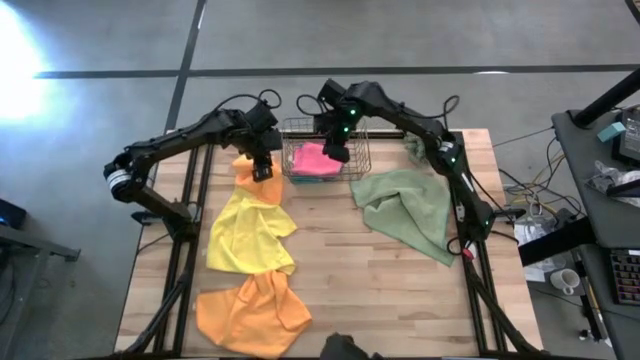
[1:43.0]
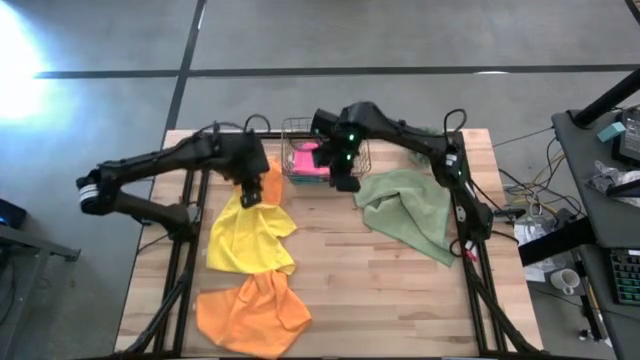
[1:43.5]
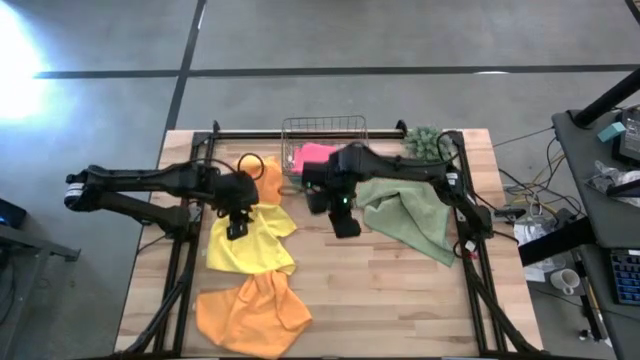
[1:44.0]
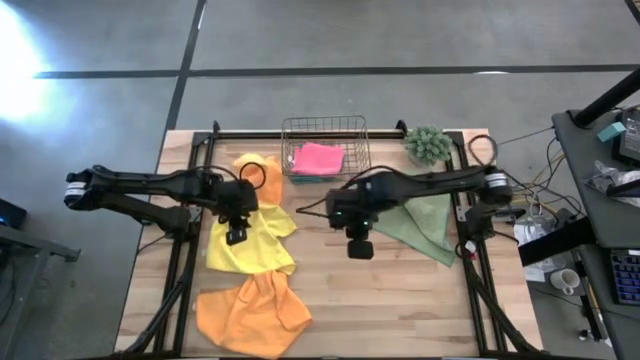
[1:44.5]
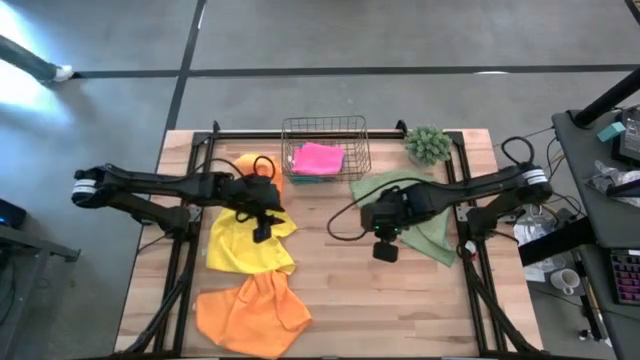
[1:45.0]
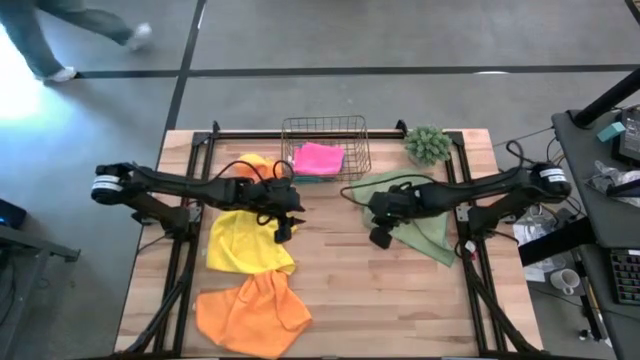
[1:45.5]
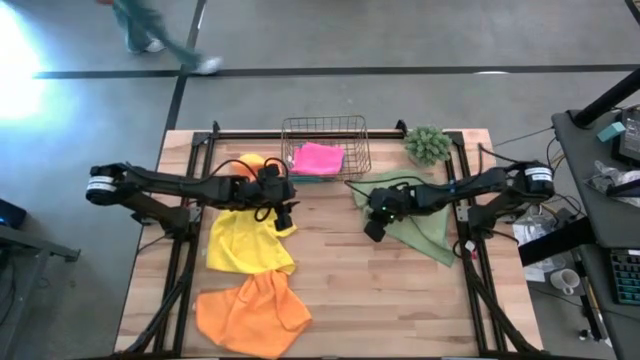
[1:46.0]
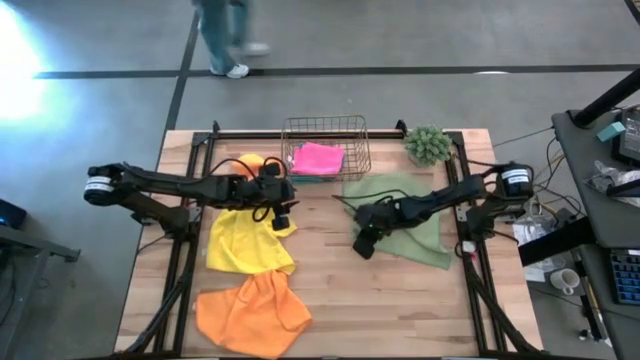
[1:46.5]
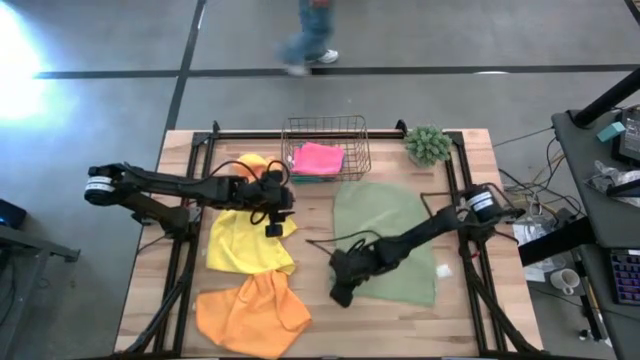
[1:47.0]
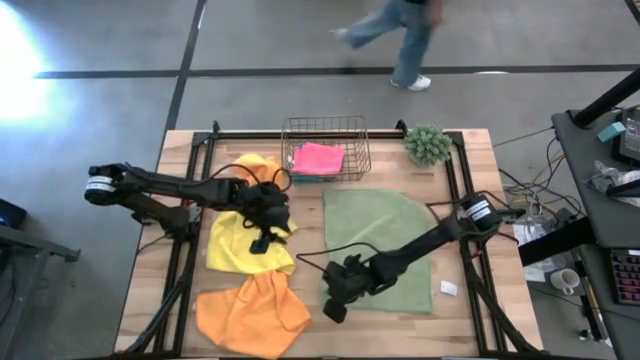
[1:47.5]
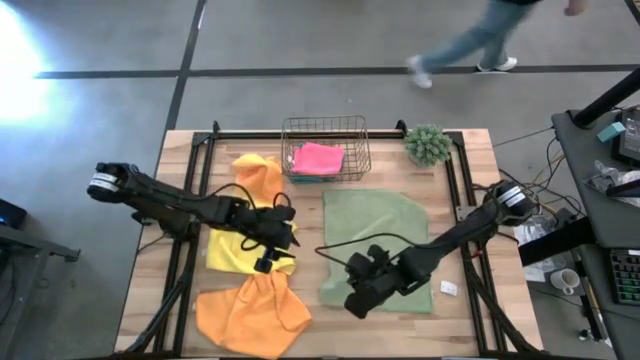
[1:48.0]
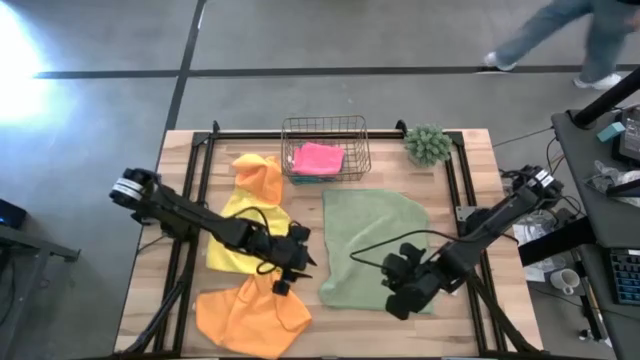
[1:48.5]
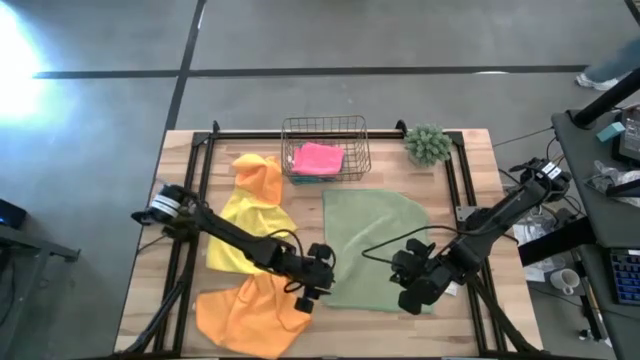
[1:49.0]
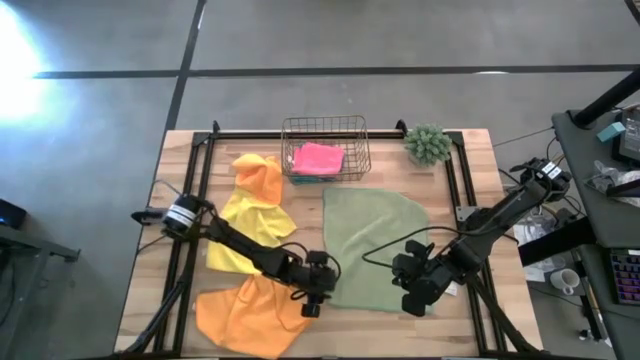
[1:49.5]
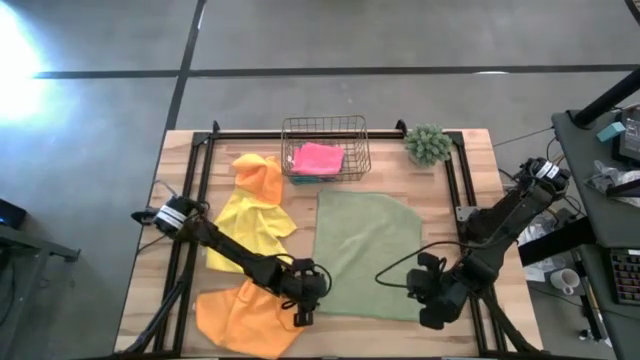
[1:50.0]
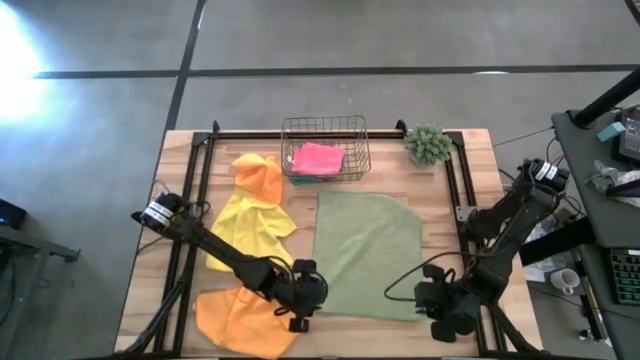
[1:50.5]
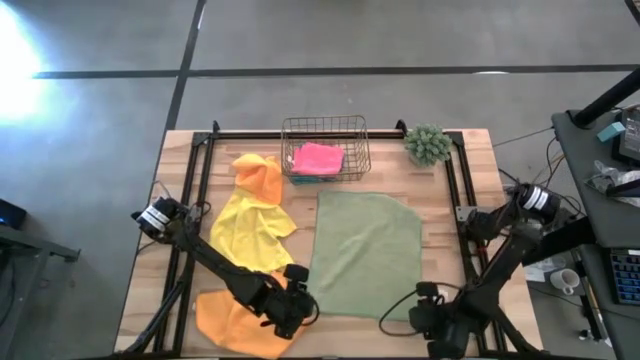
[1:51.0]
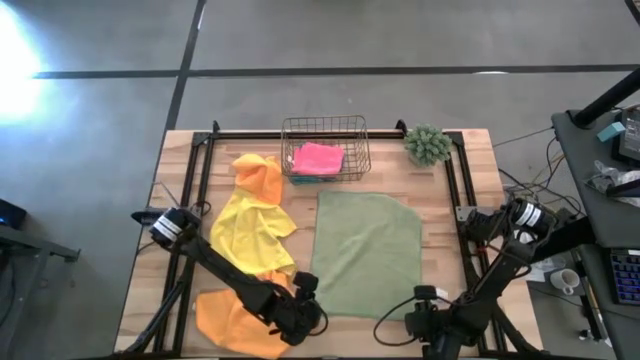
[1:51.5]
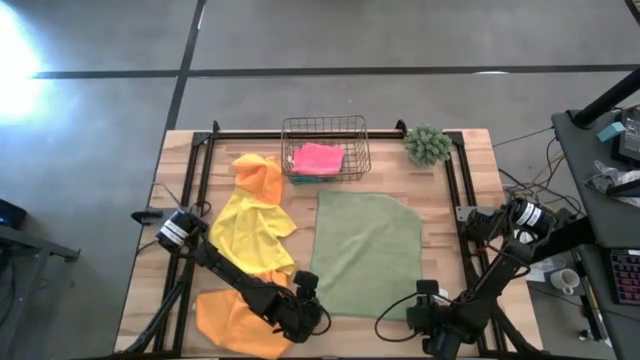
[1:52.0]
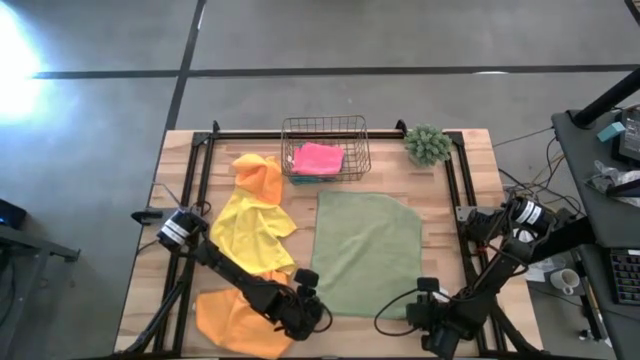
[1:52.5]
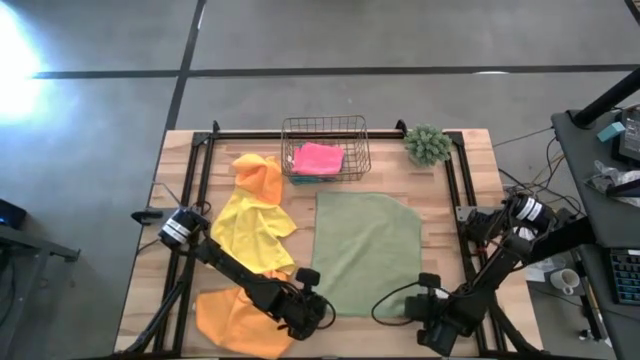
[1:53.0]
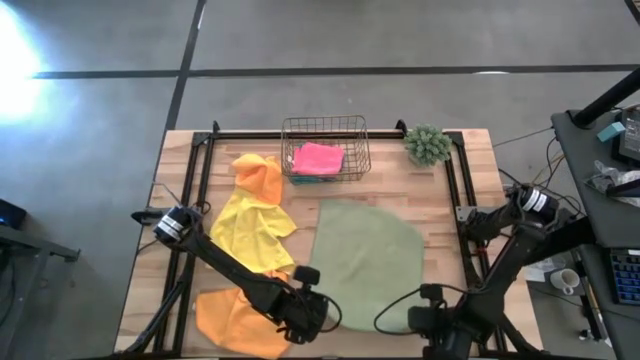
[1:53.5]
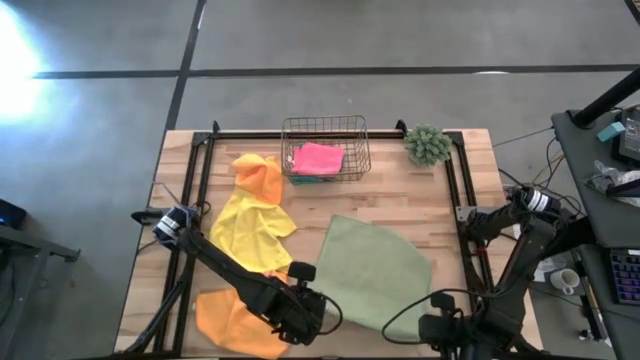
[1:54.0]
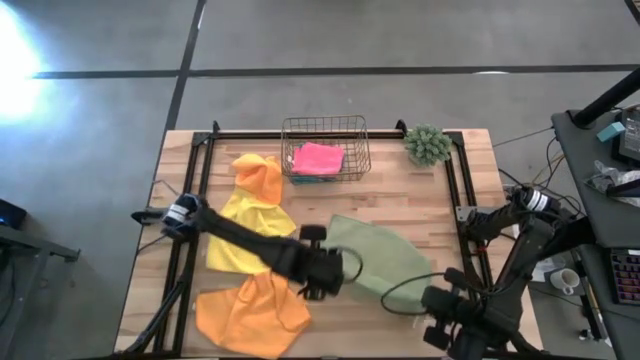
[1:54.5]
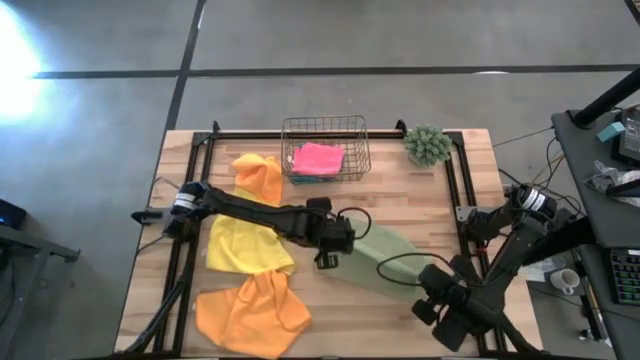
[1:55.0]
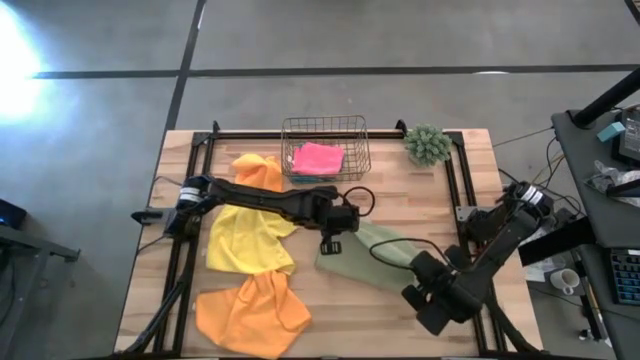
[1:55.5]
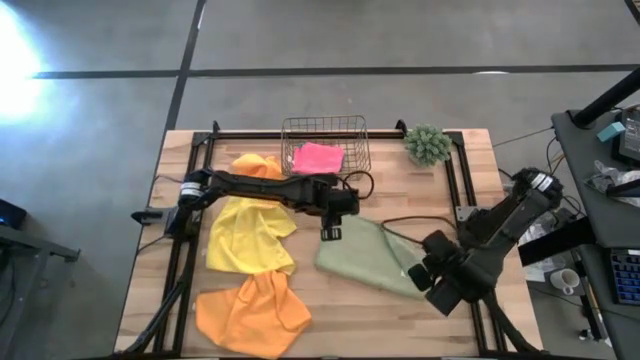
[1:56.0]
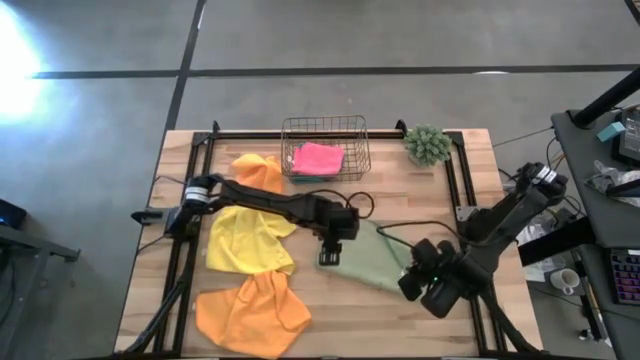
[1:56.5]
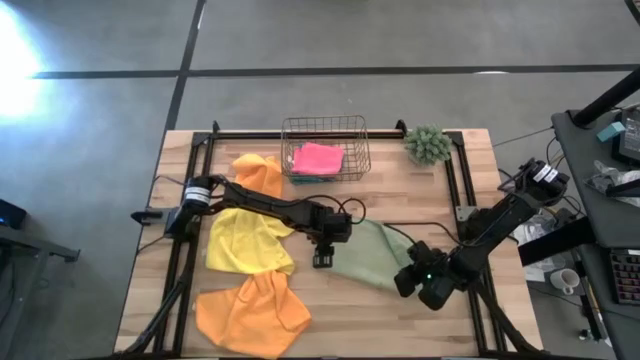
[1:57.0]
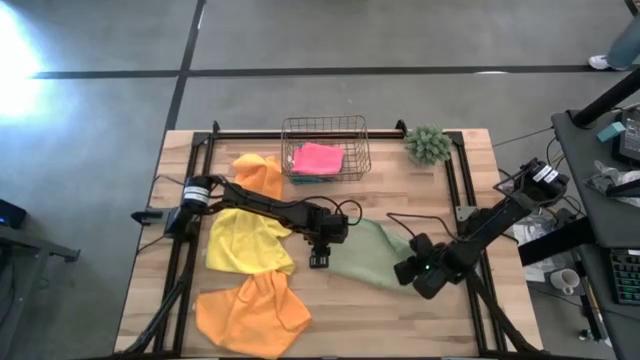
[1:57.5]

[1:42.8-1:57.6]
Task: Fold microfiber towels
Fold the green microfiber cloth

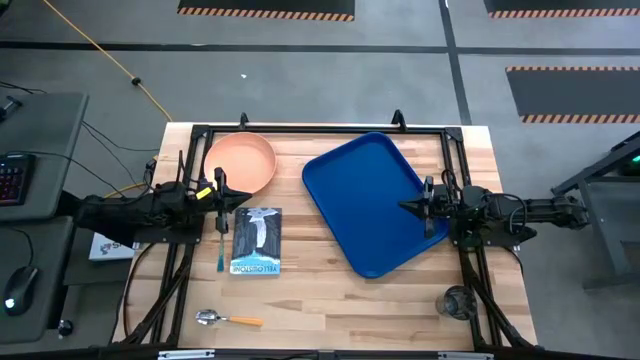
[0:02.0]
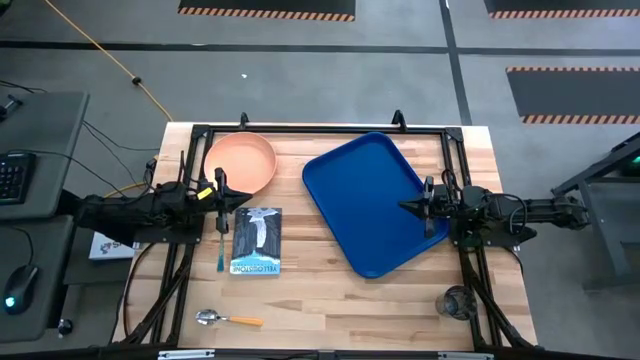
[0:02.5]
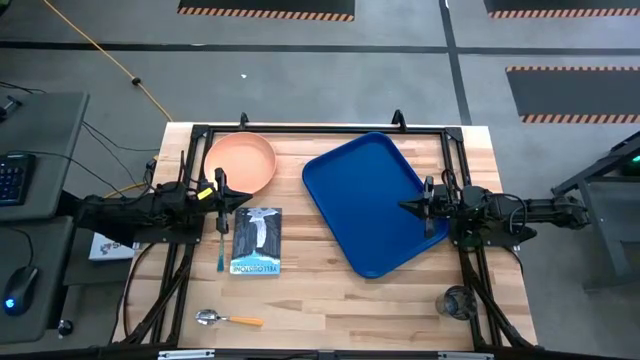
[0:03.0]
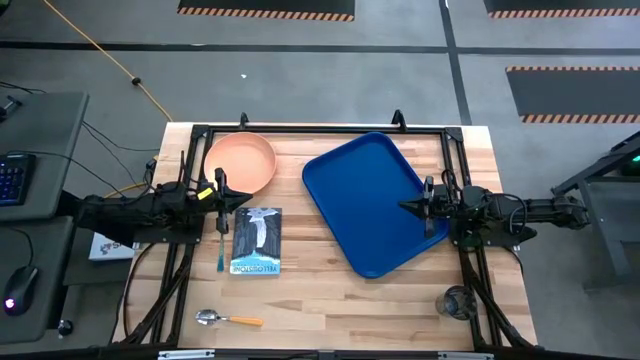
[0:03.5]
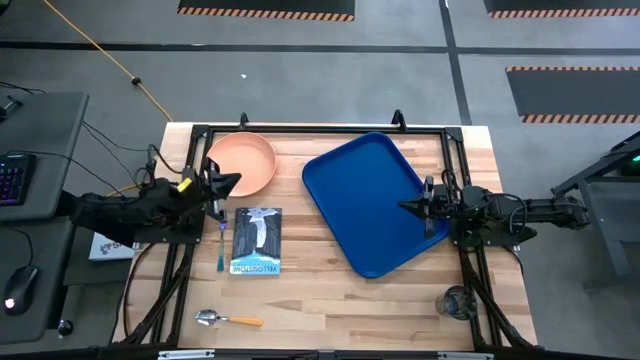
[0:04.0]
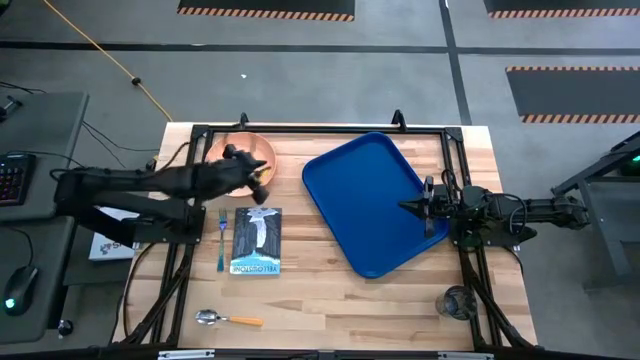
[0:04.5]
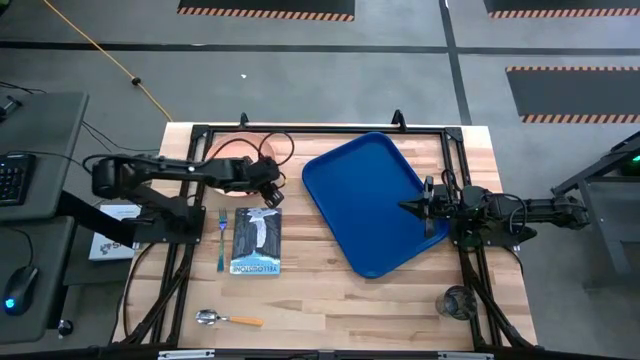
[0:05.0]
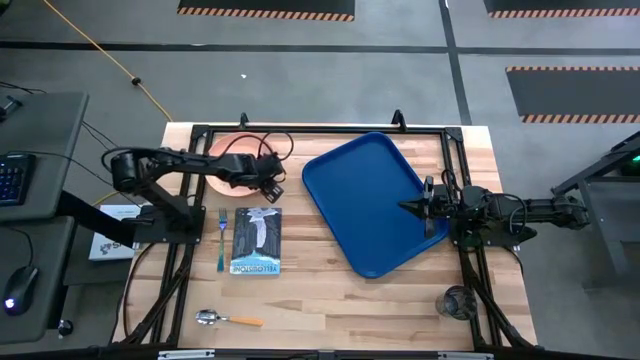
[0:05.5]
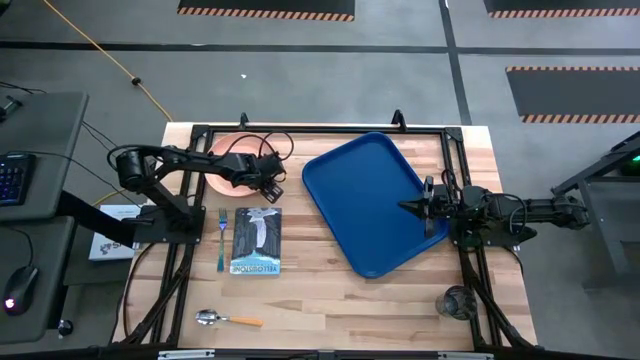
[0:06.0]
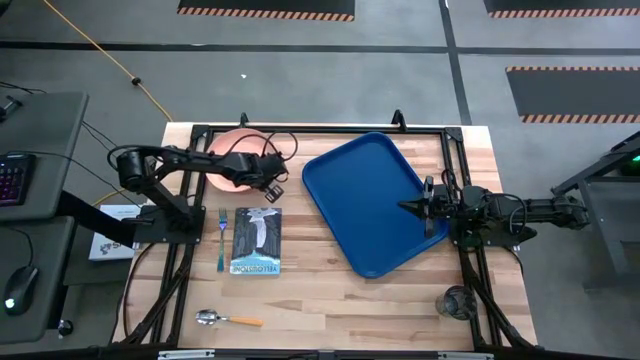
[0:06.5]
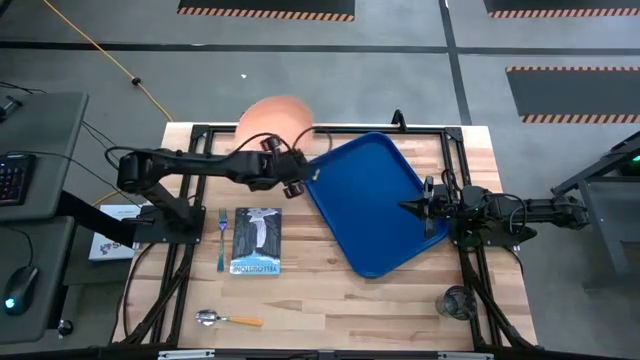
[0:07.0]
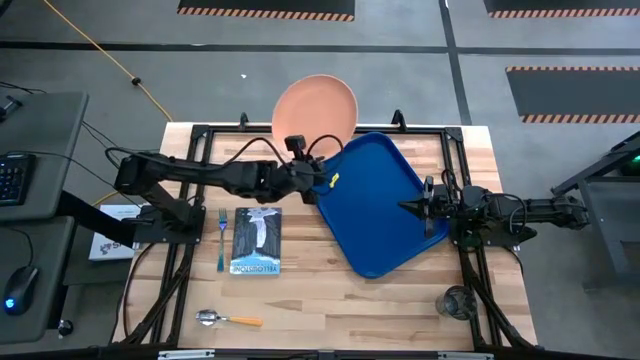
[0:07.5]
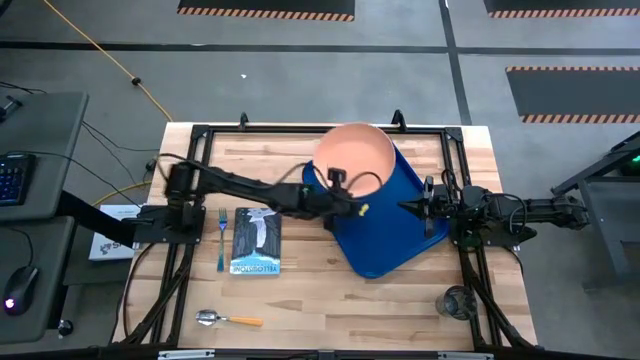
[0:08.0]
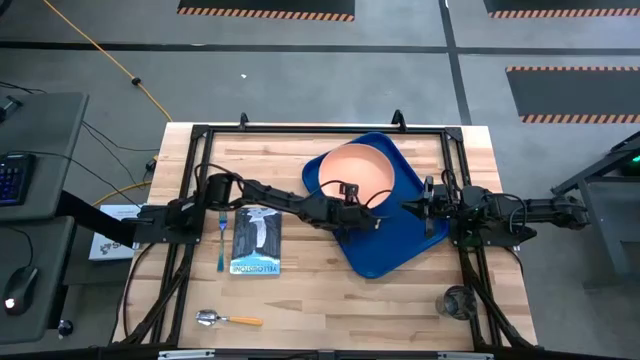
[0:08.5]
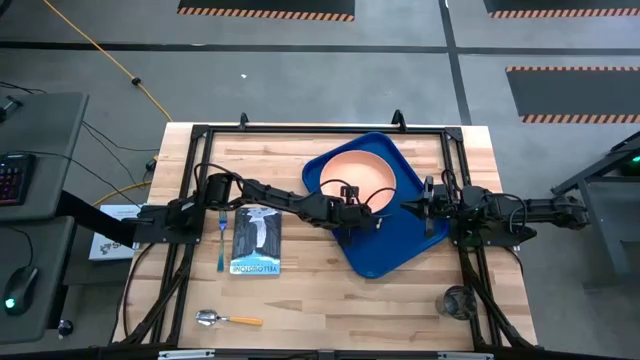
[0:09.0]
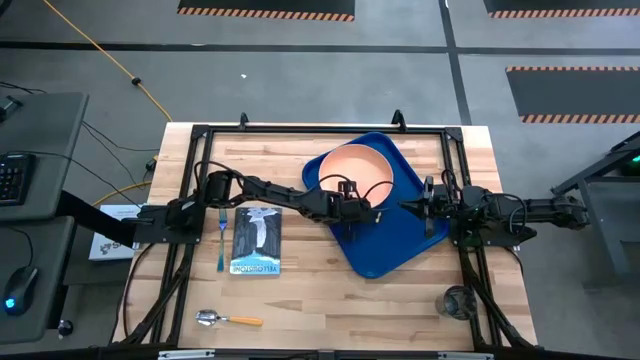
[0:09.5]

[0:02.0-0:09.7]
Task: Pick and place plate/cup/fork/spoon on tray
Put the brown plate on the blue tray
